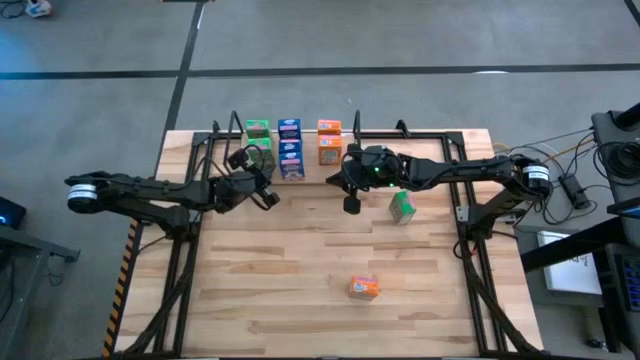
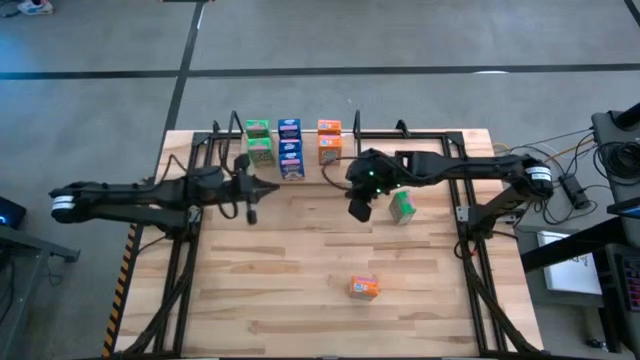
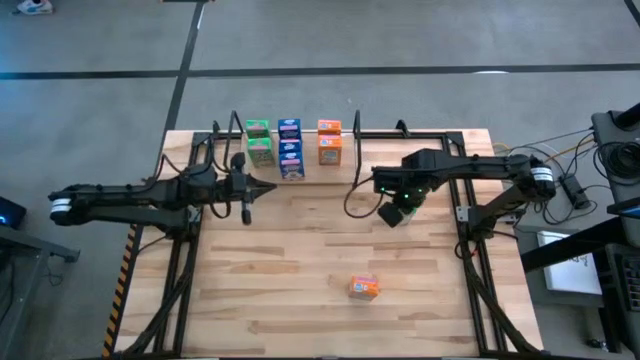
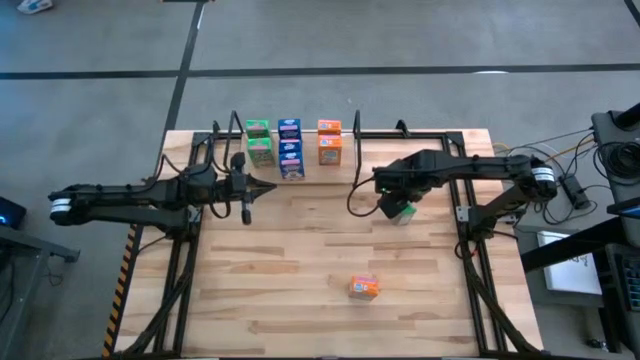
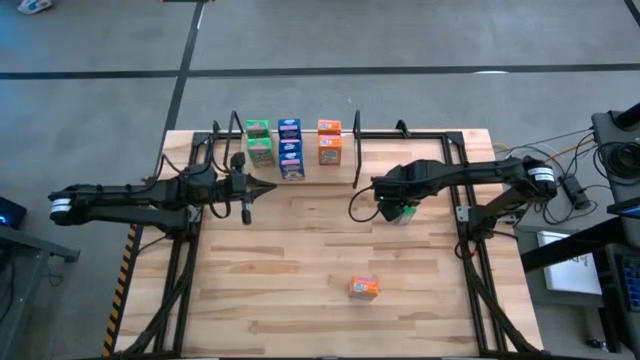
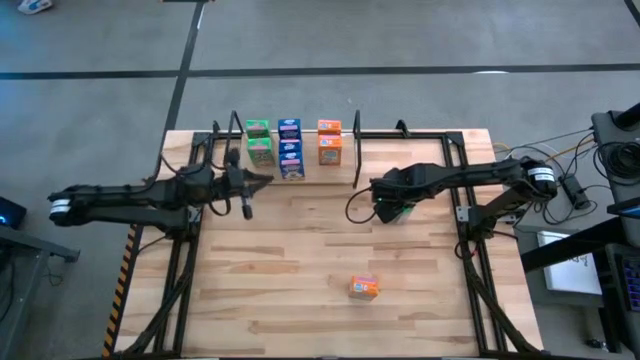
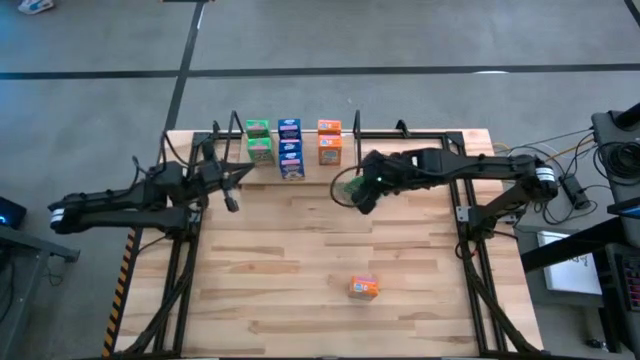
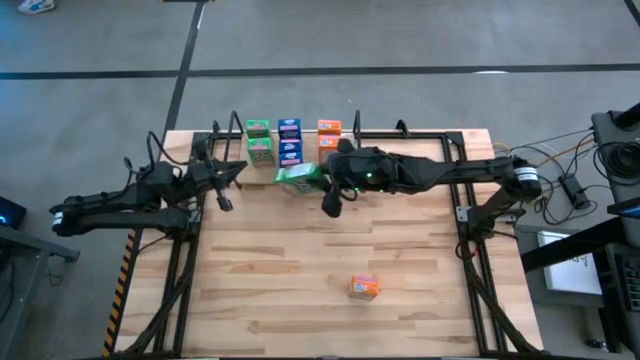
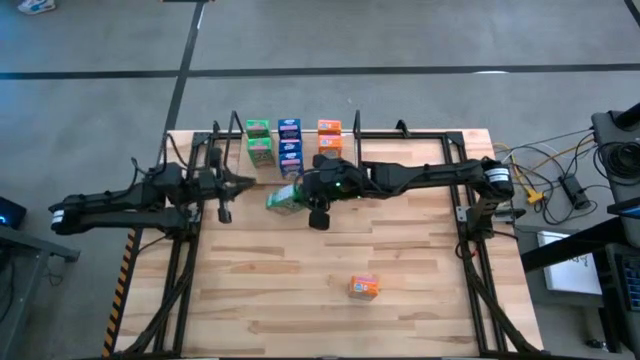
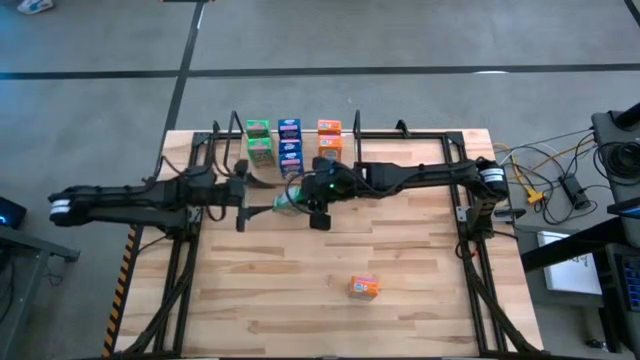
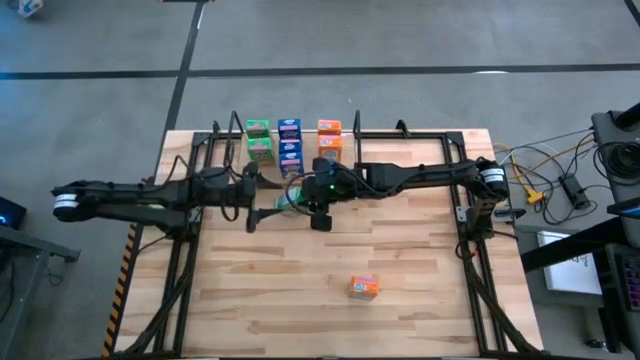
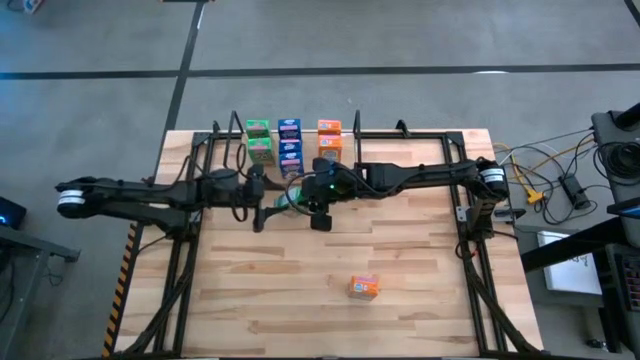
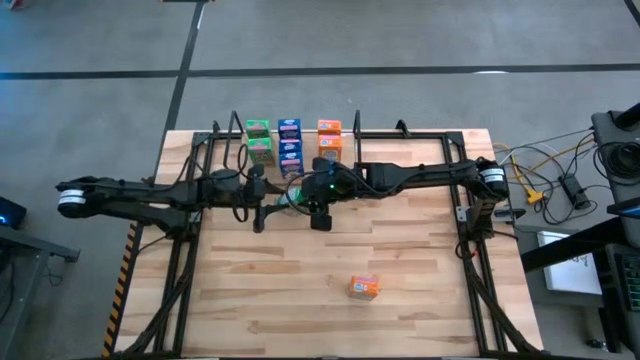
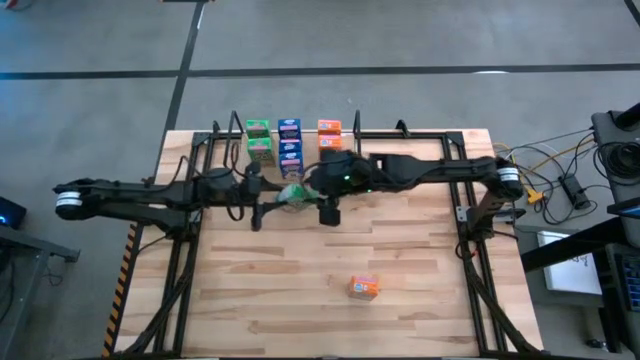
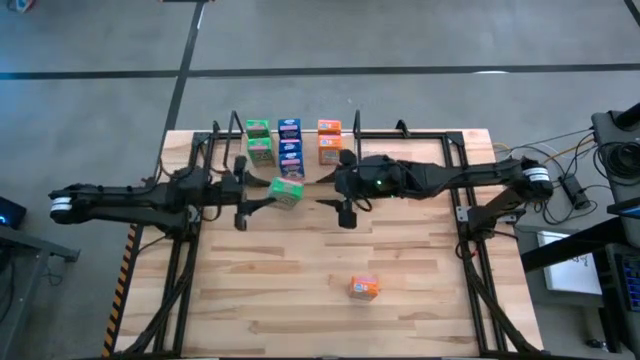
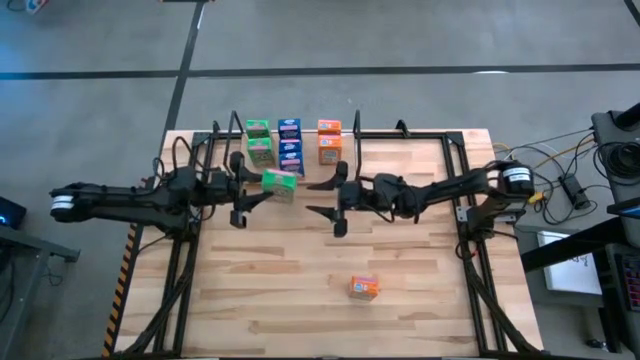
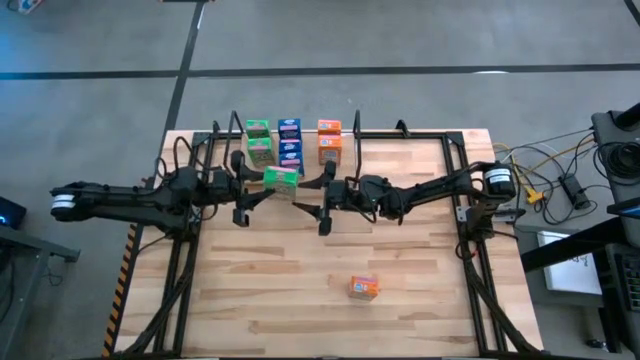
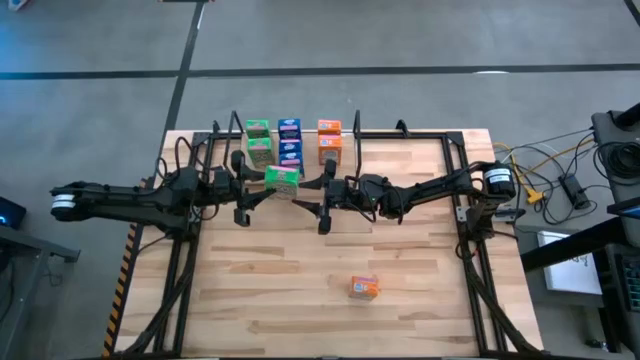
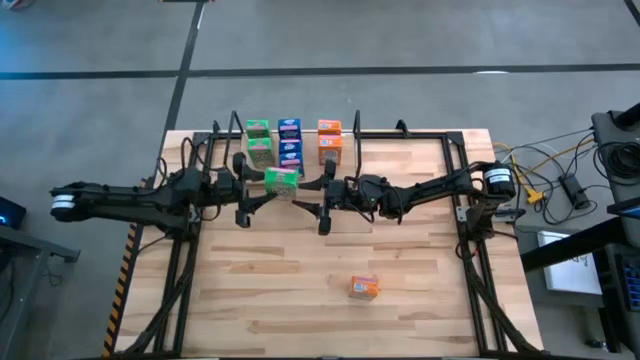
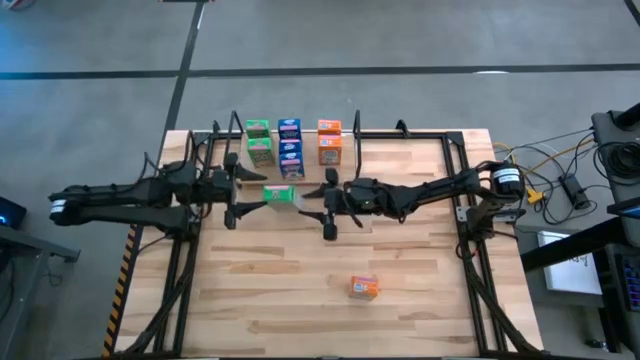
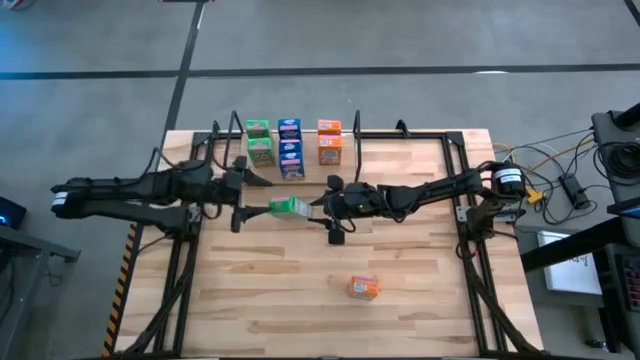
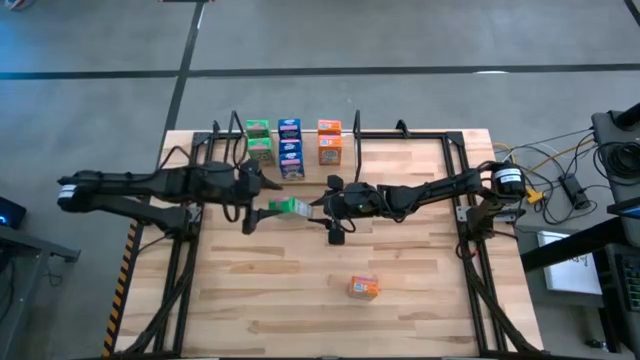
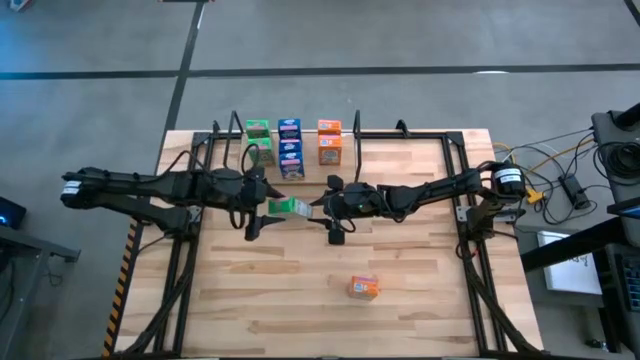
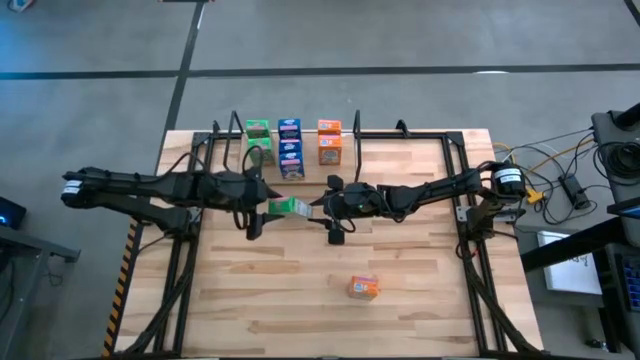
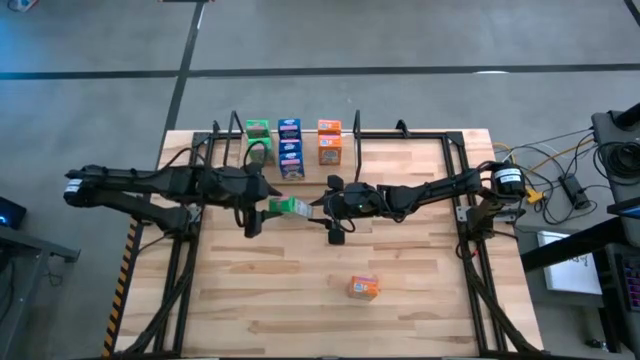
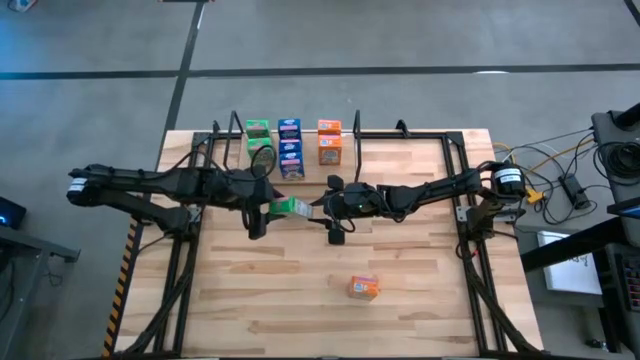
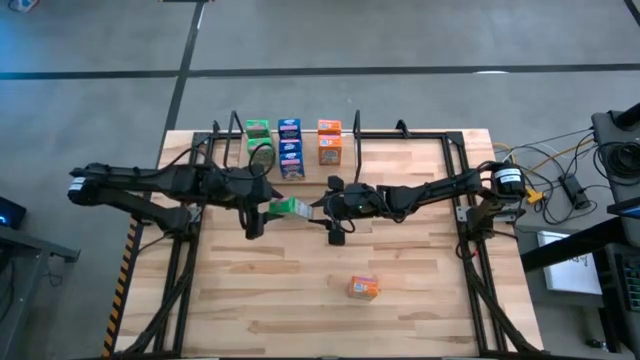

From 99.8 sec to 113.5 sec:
Task: Stack cereal on shelf
Put the green cereal box on the shelf aligned with the other green cereal box

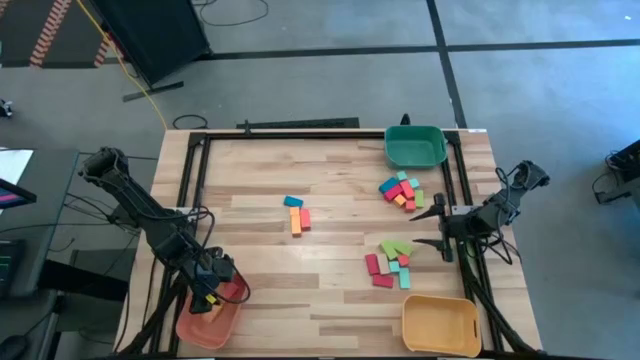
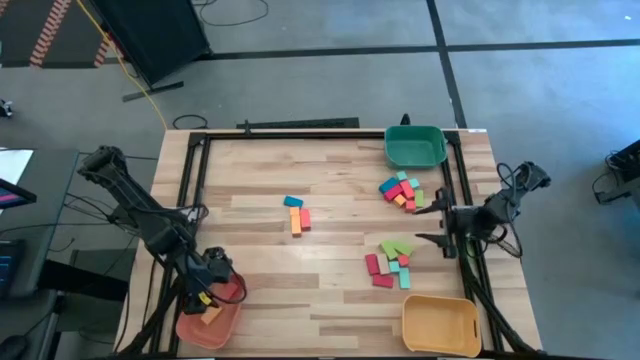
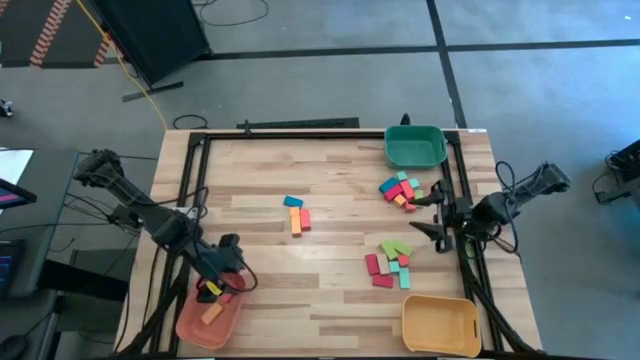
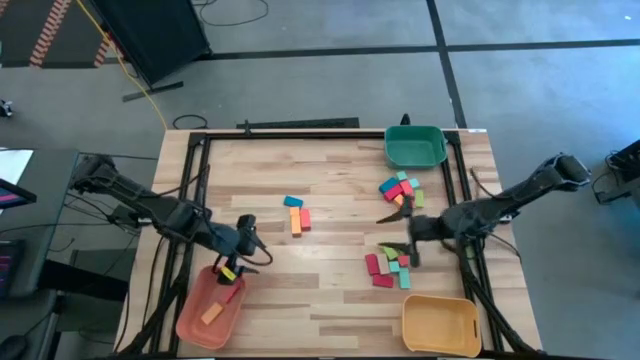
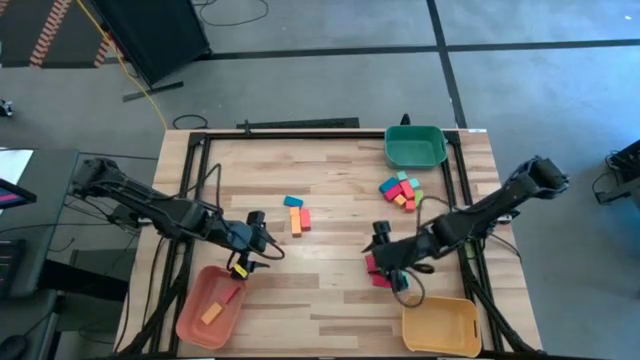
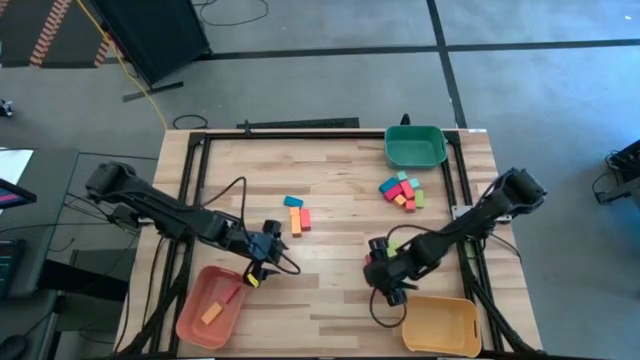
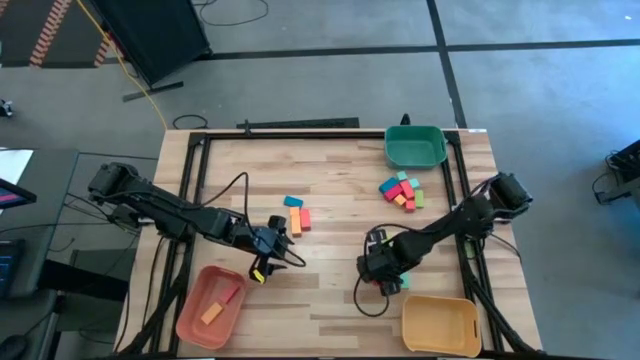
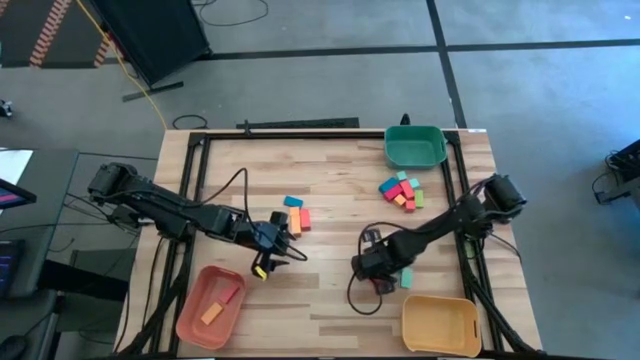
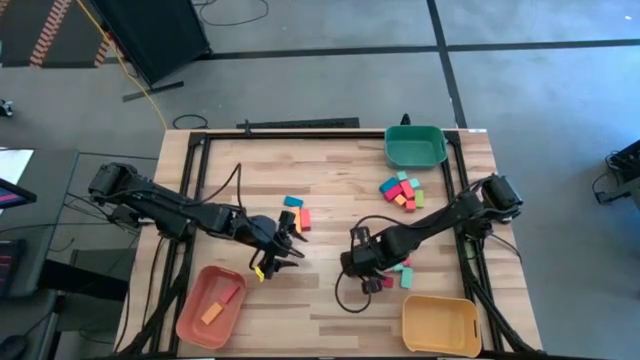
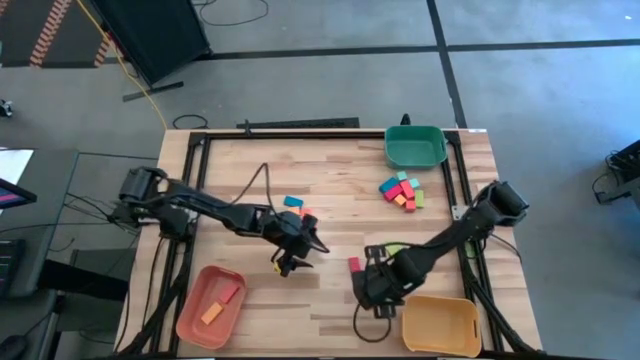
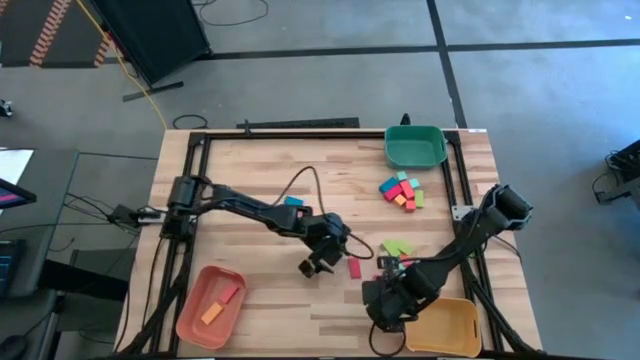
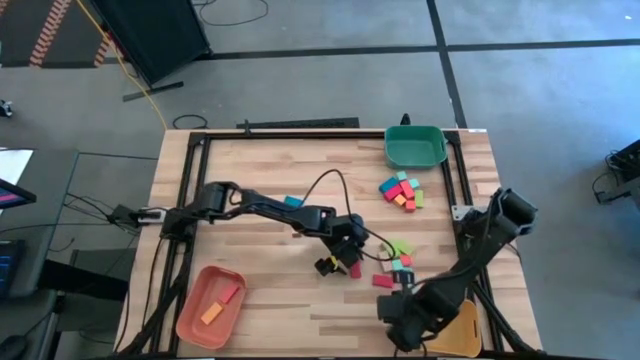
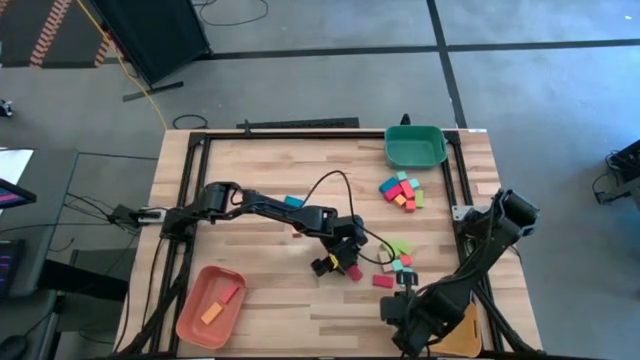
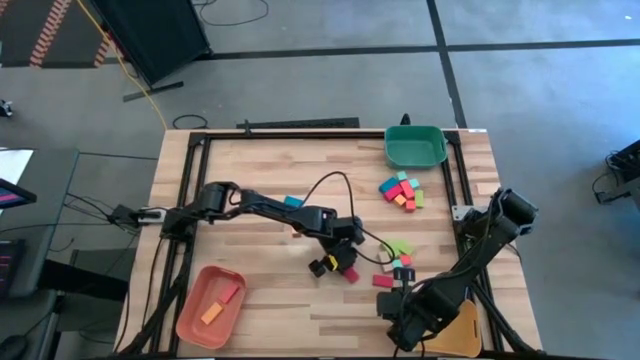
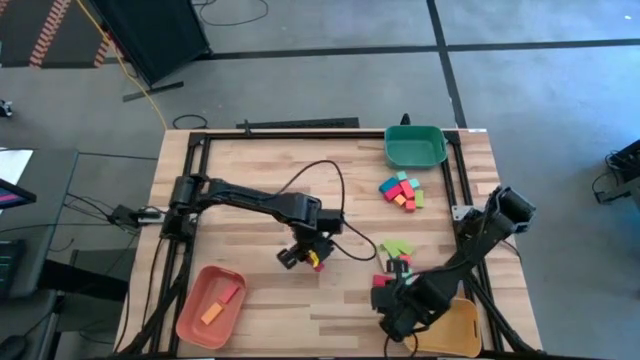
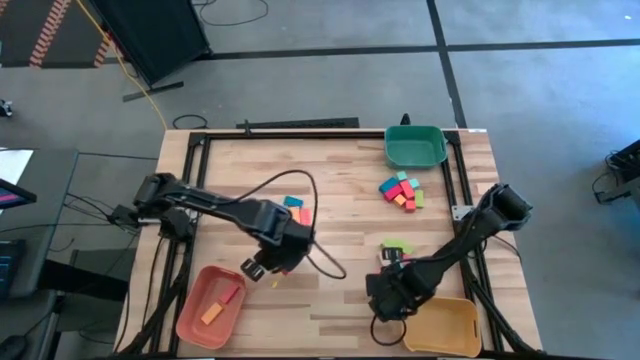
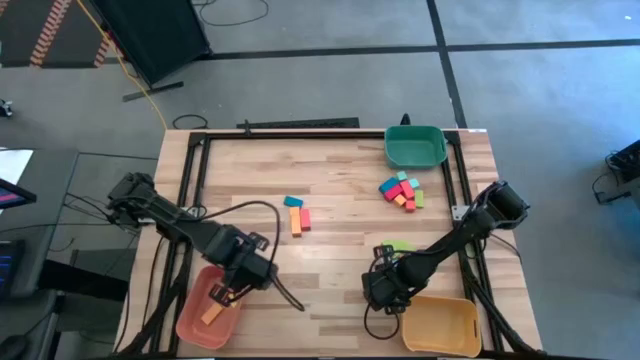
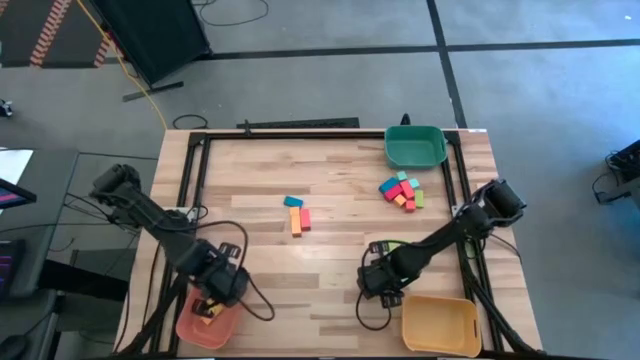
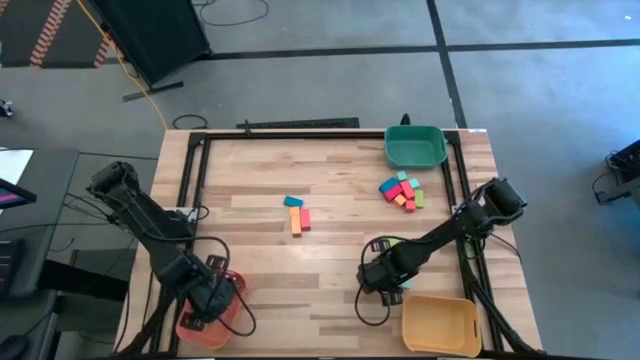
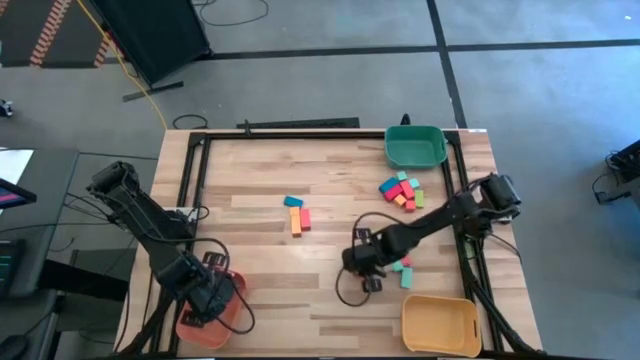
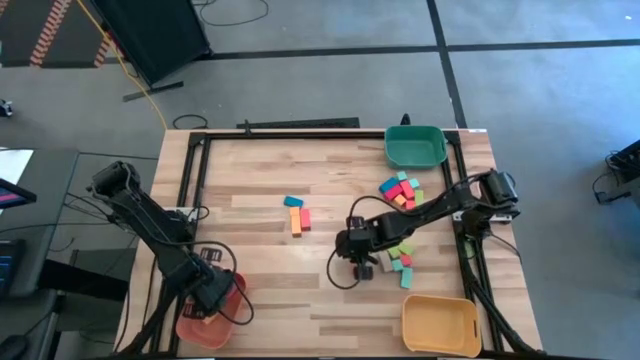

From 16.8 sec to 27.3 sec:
Task: Sort blocks by size
Put the medium red rectangular block into the orange bin
